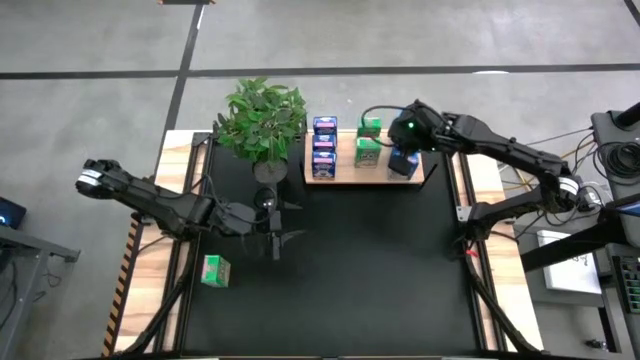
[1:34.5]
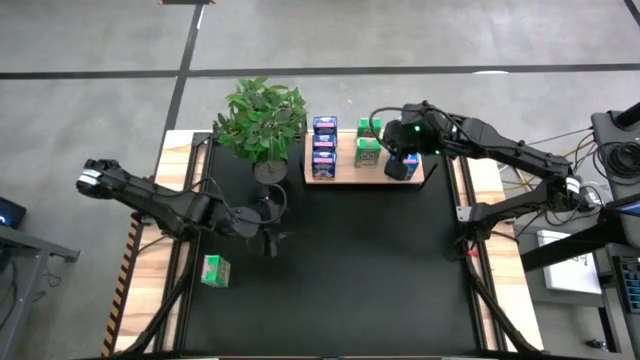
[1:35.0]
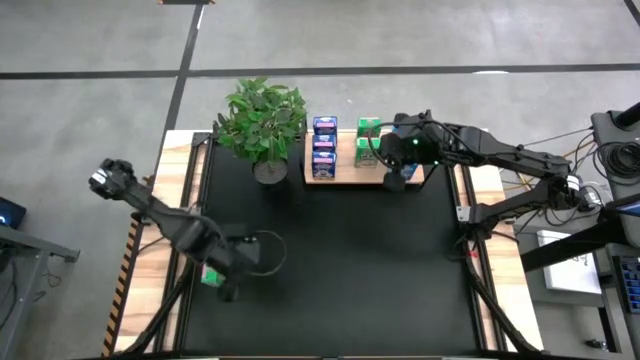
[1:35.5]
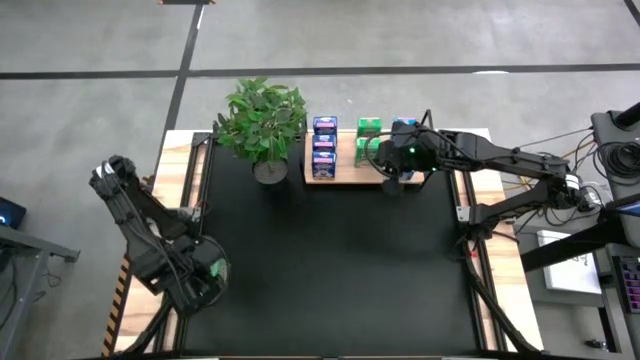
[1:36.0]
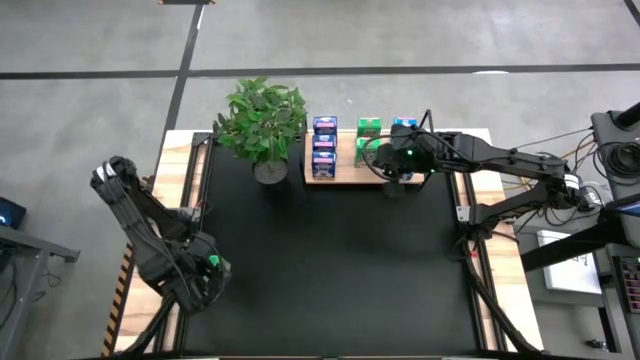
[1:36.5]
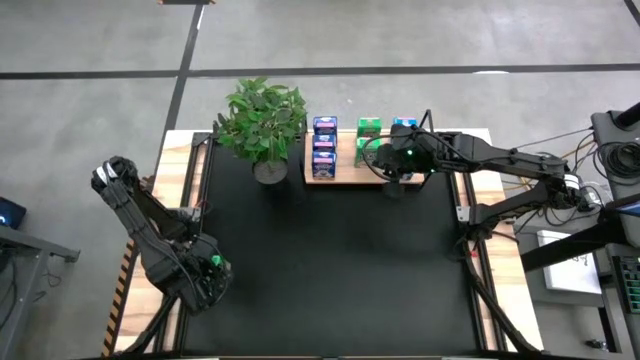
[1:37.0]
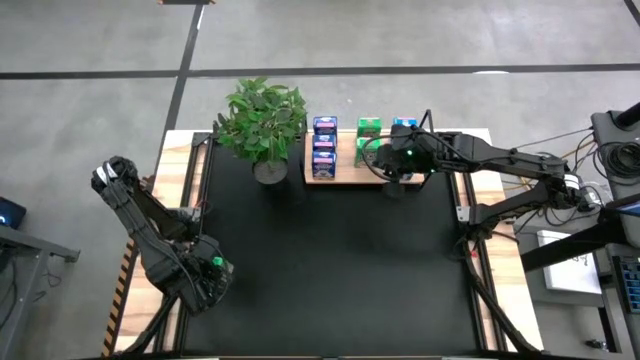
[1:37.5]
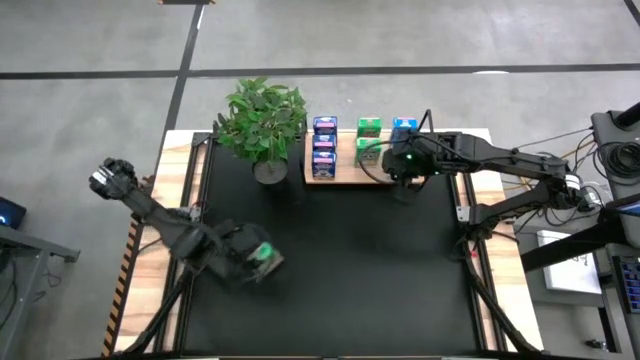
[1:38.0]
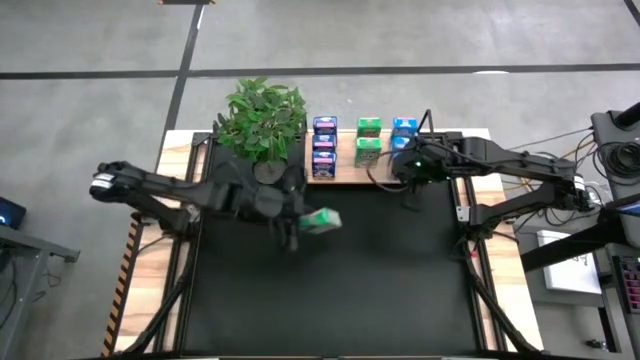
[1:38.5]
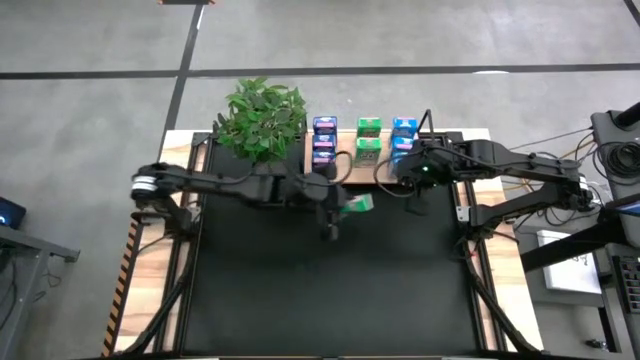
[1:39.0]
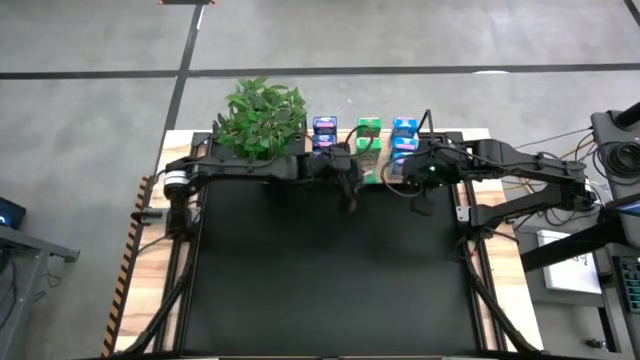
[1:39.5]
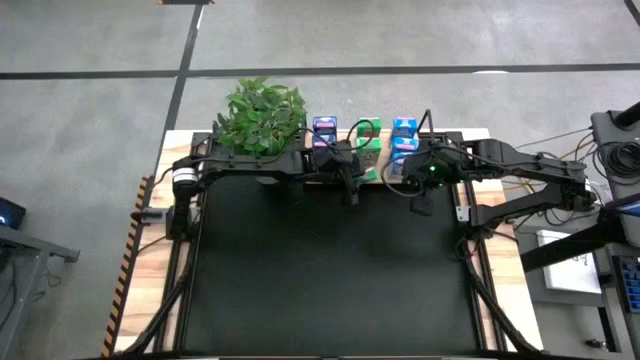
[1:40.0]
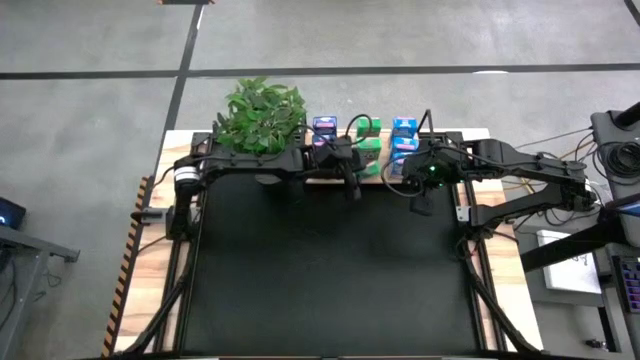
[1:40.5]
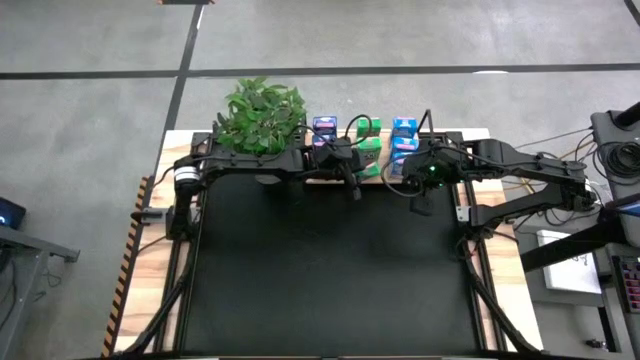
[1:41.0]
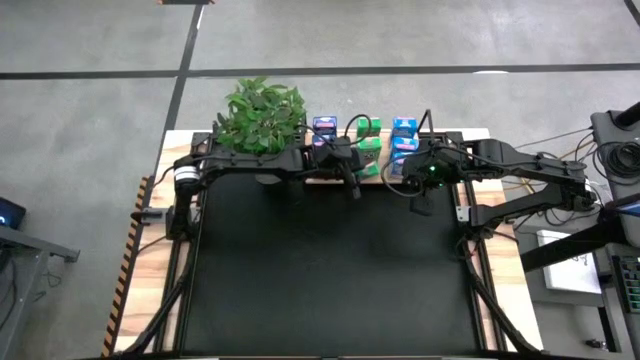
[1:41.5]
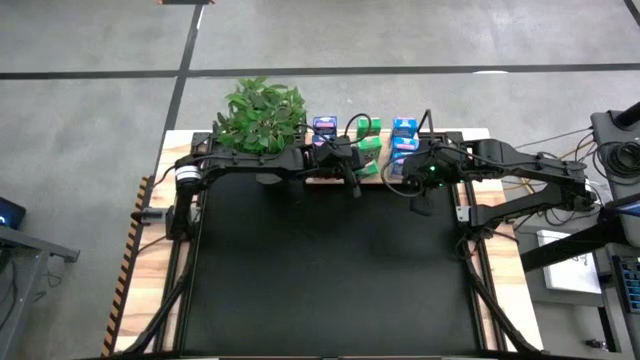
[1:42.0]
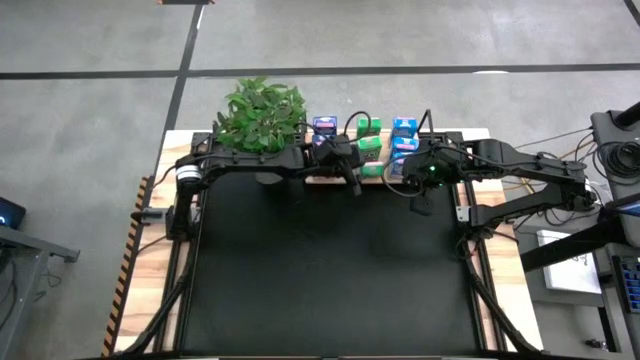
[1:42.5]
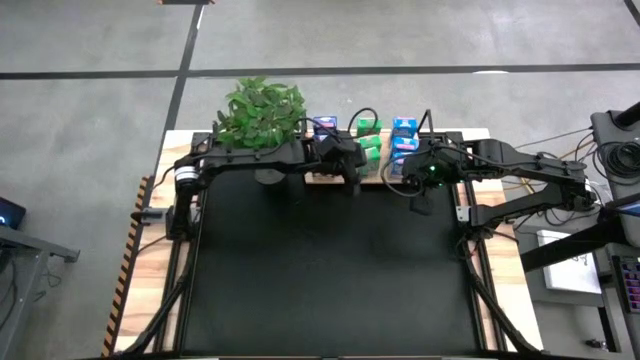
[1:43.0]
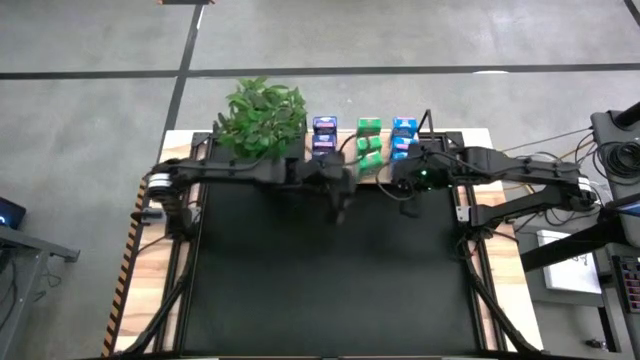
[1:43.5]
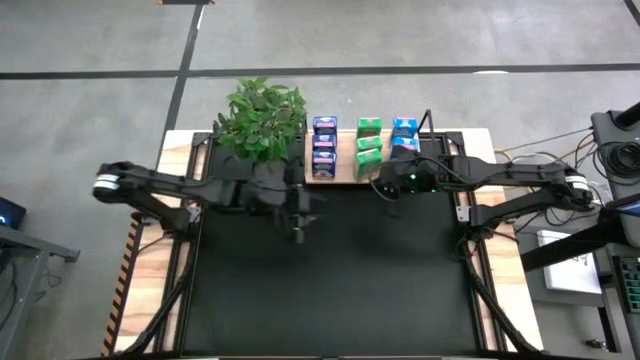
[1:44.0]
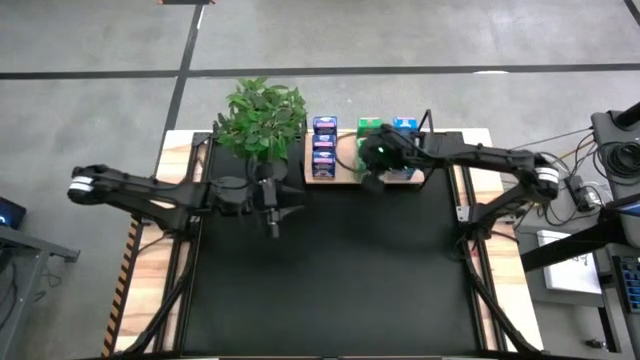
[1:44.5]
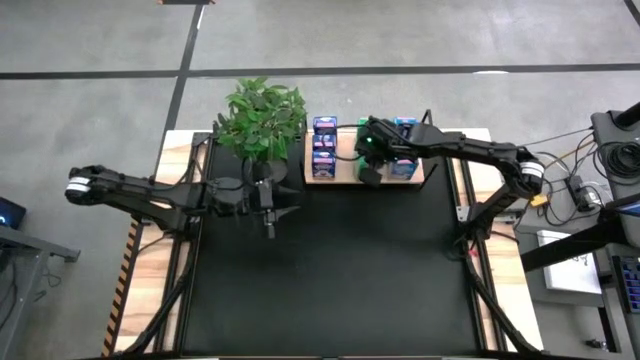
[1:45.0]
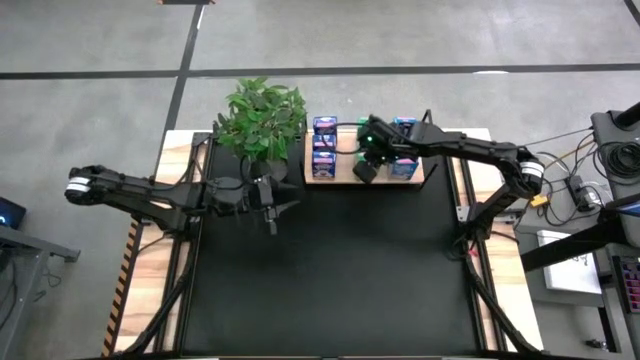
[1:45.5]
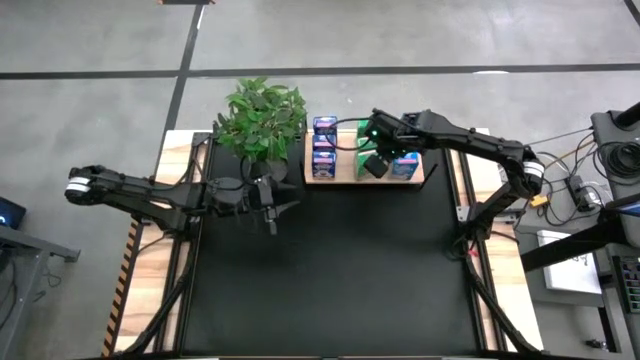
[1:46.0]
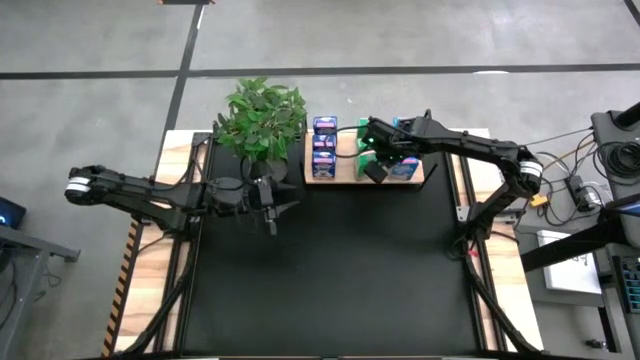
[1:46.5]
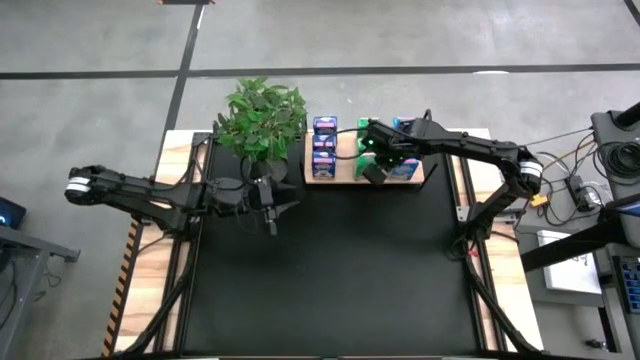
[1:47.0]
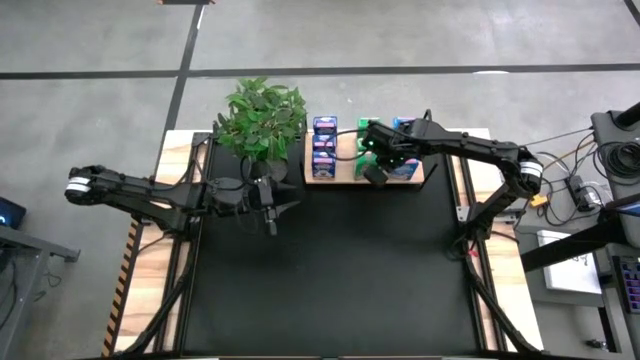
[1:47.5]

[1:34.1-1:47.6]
Task: Stack cereal on shelf
Put the green cereal box on the shelf aligned with the other green cereal boxes

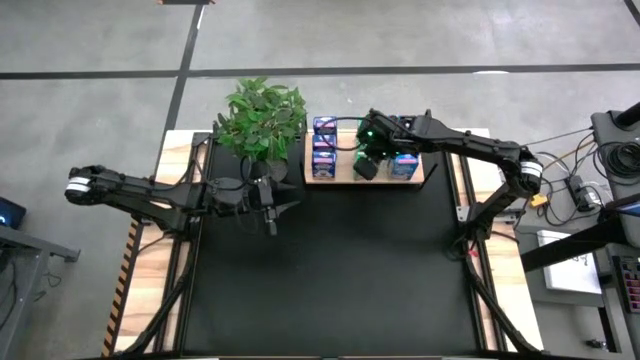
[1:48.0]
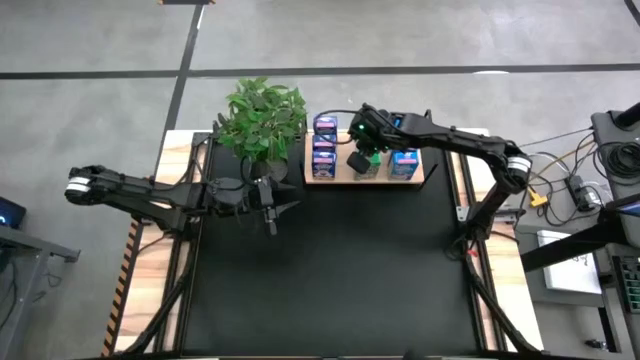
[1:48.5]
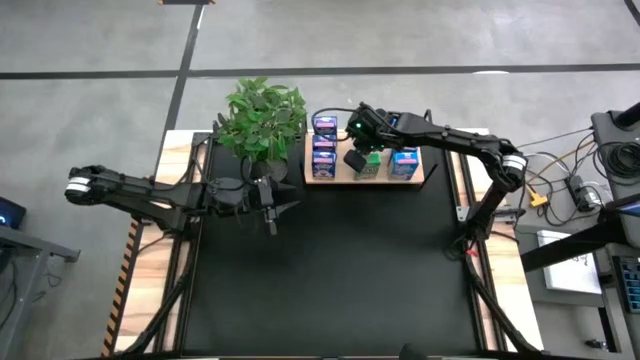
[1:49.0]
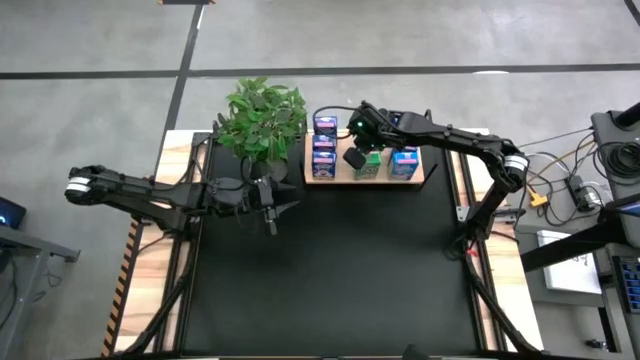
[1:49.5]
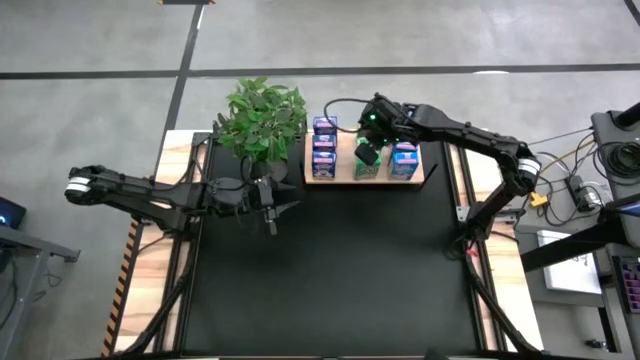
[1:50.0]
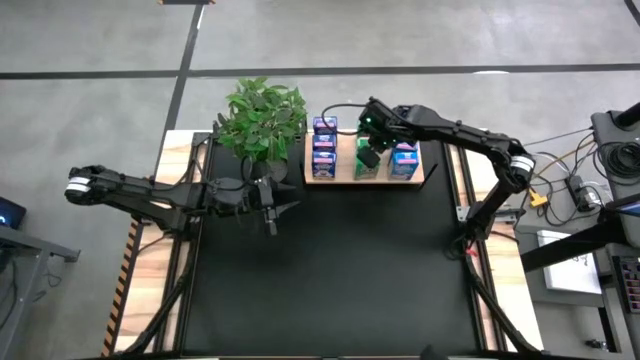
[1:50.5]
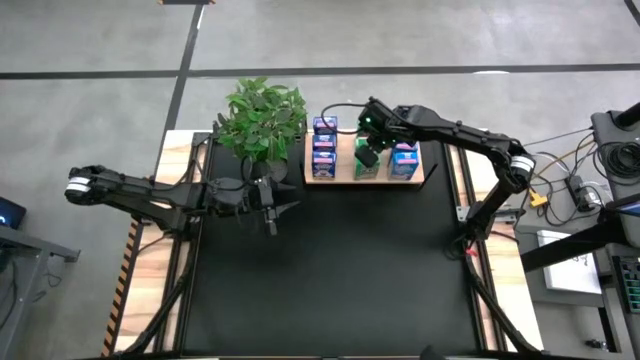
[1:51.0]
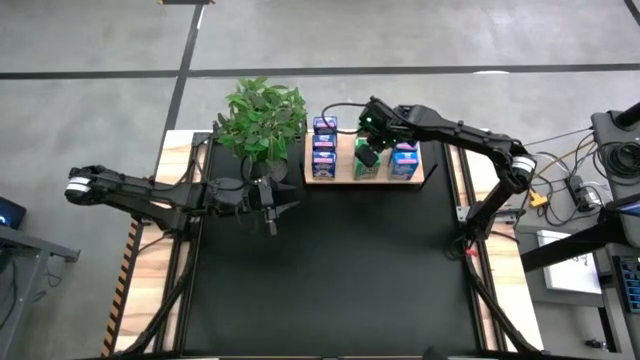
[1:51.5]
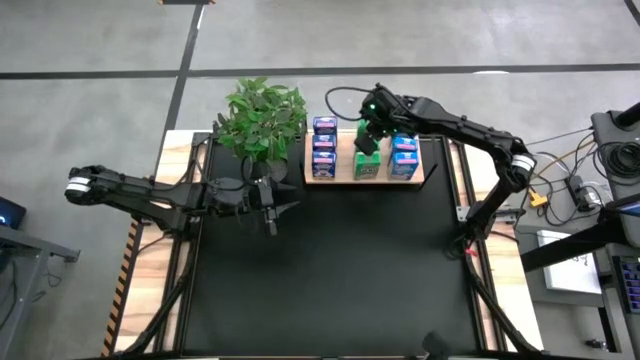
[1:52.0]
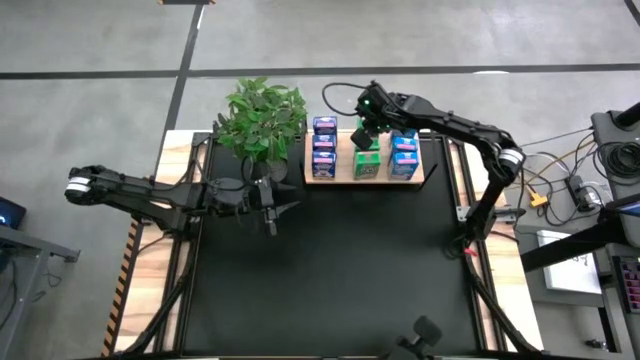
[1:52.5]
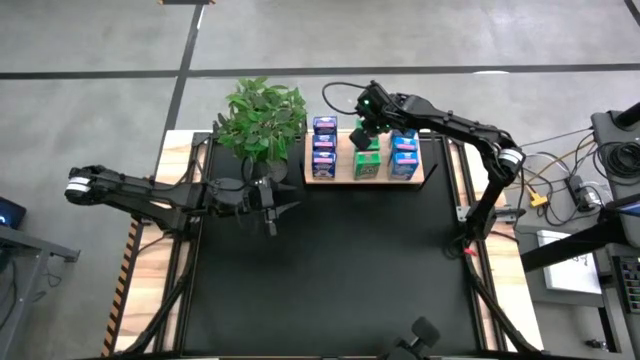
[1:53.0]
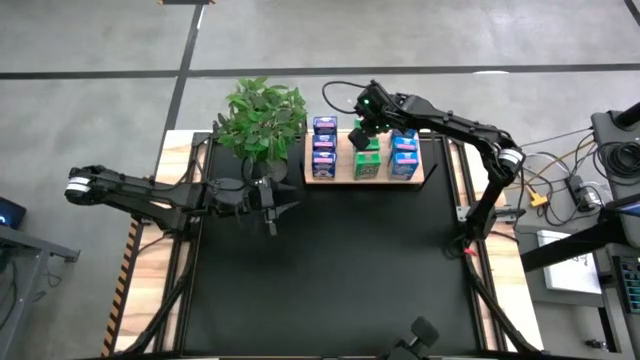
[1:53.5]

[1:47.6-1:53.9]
Adjust the green cereal boxes

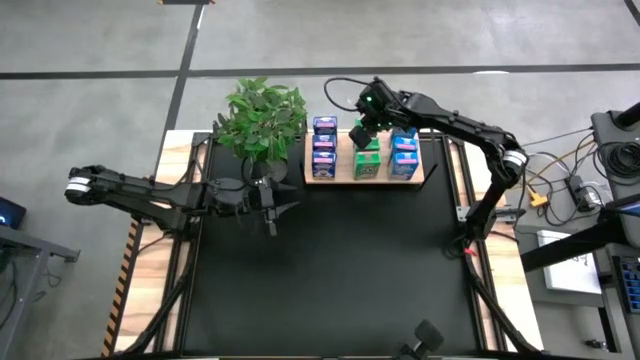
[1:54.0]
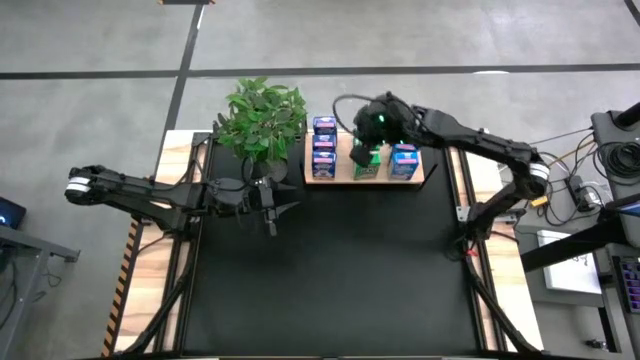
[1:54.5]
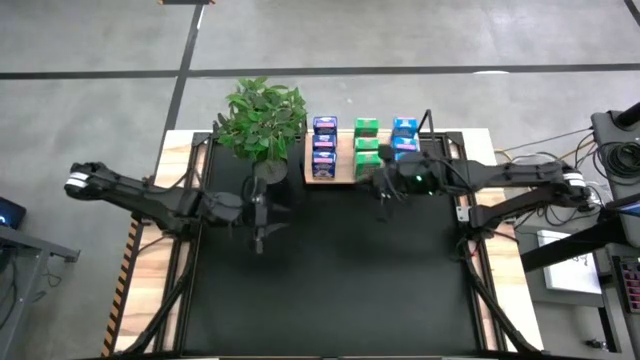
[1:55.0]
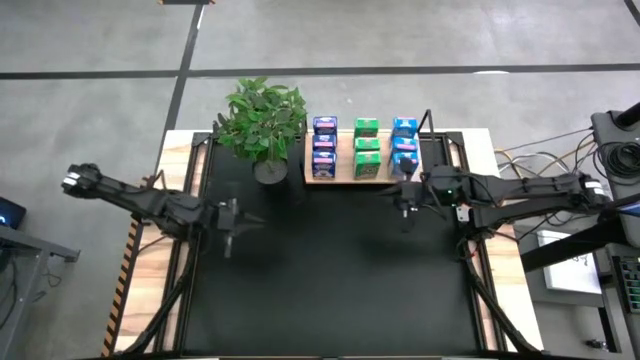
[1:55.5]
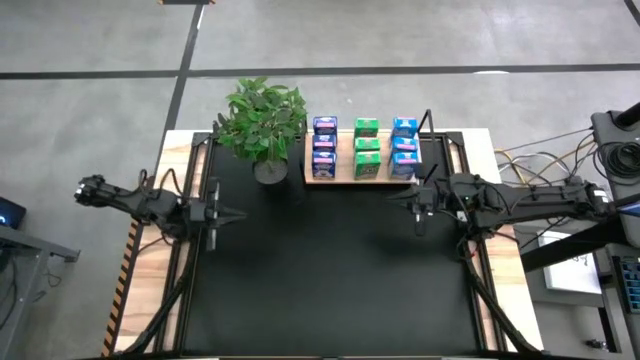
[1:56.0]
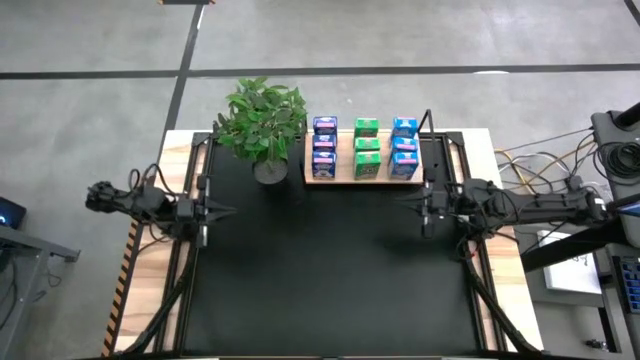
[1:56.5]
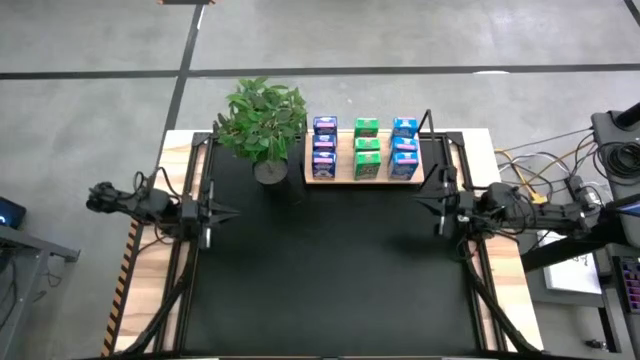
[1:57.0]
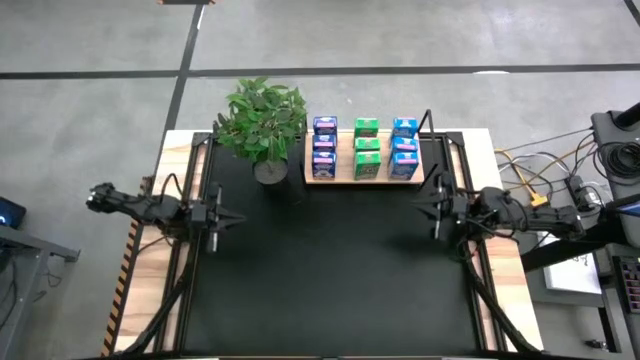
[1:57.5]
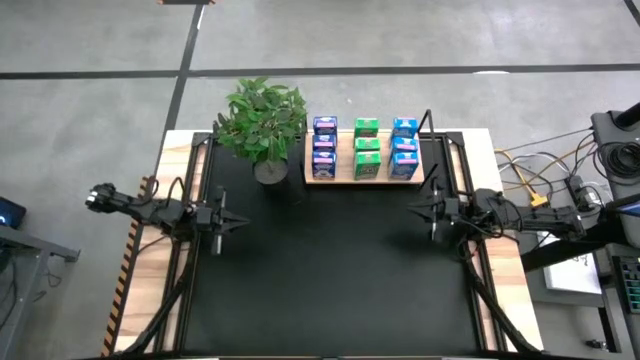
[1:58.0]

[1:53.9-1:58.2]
Return to home position
